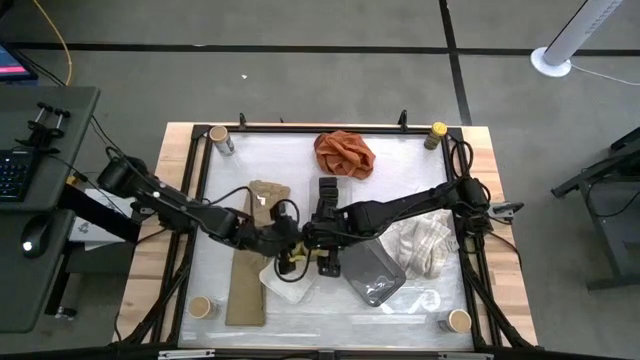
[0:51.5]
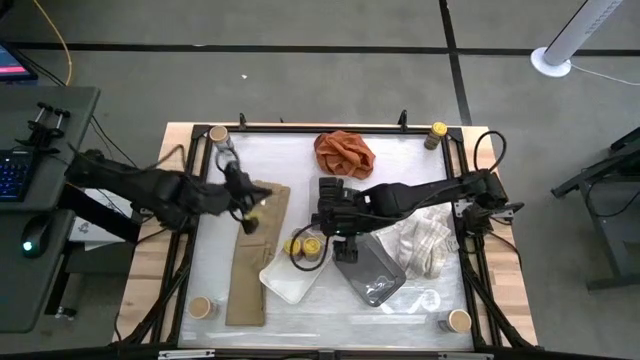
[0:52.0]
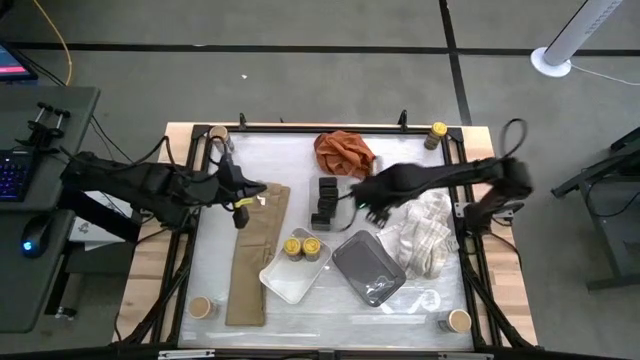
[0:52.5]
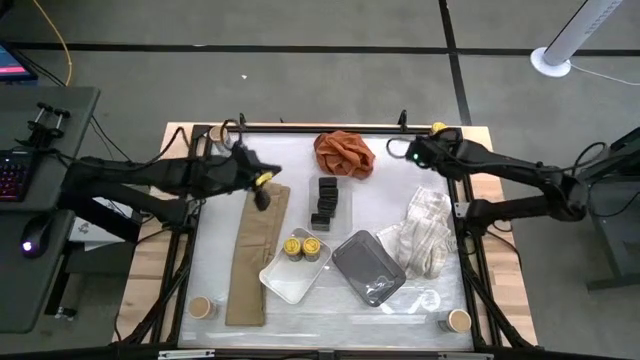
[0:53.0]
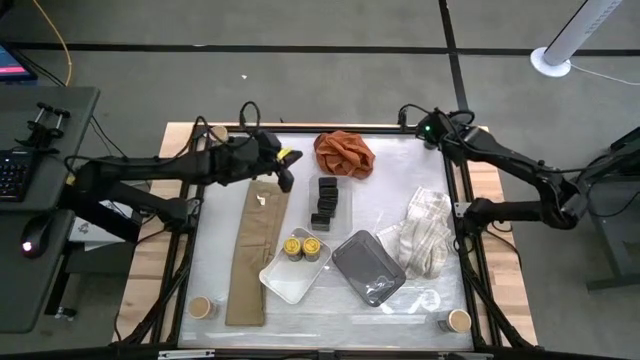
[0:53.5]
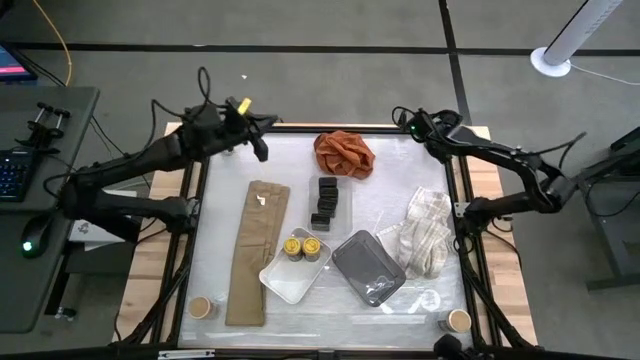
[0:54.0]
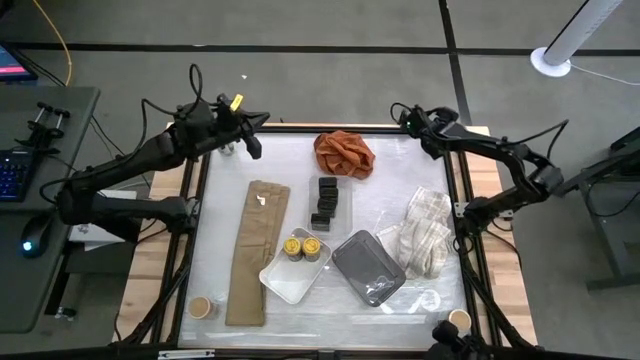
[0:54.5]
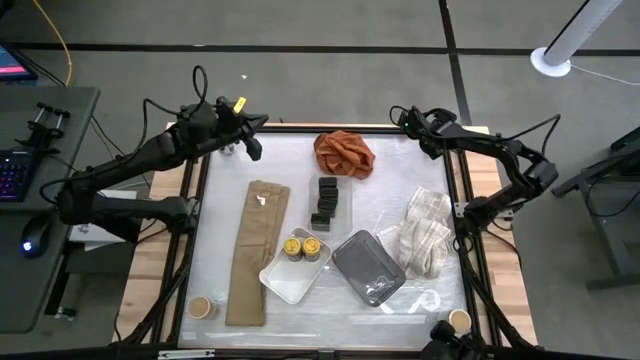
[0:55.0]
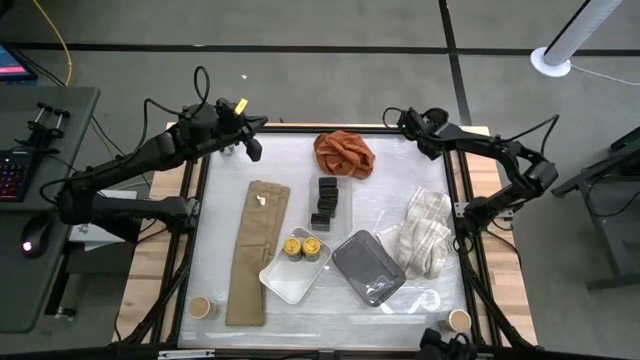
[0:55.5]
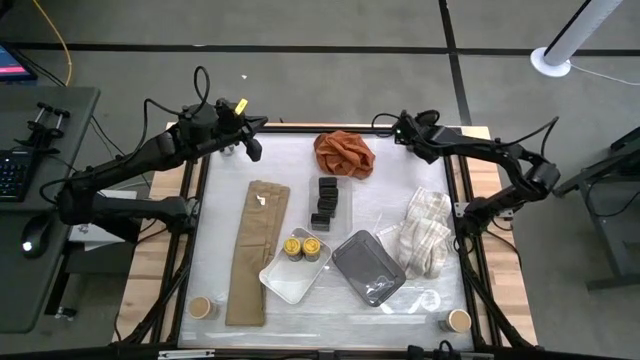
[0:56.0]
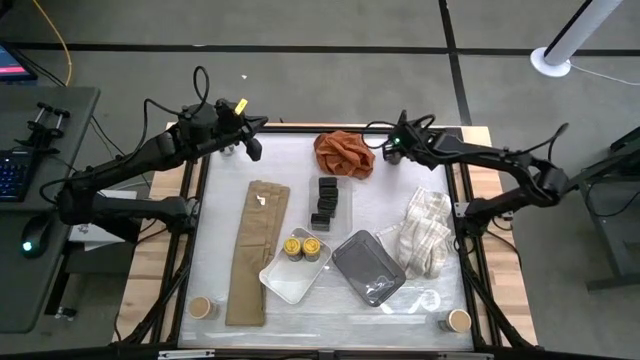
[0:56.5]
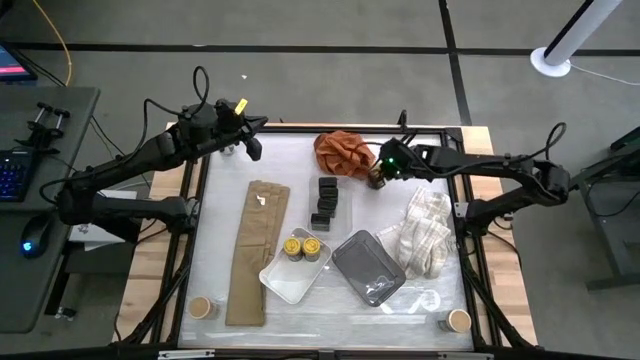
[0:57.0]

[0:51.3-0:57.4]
Task: Sort spices by type
Put the yellow seasoning bottle into the white bin

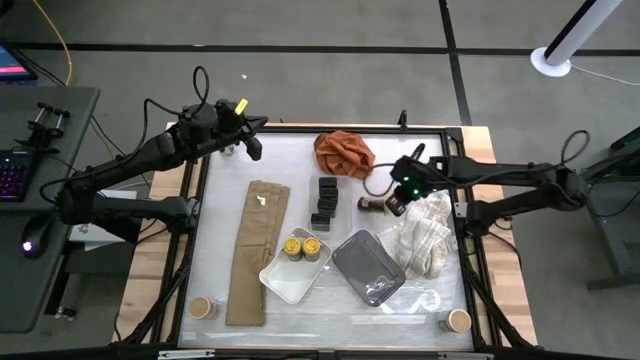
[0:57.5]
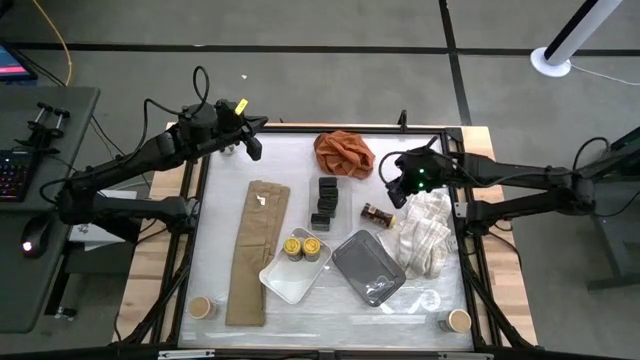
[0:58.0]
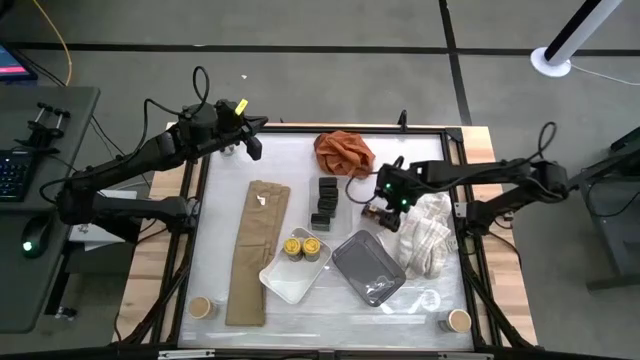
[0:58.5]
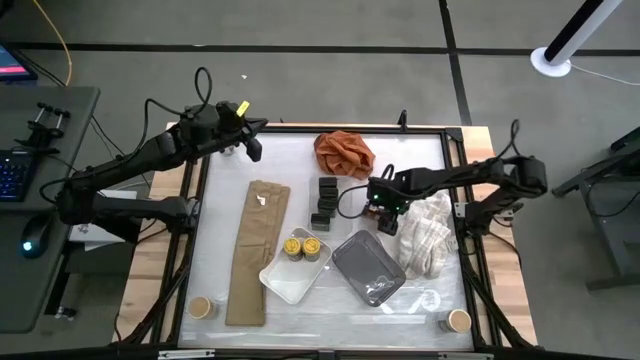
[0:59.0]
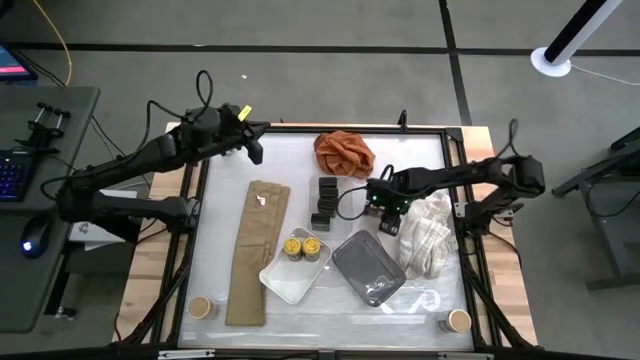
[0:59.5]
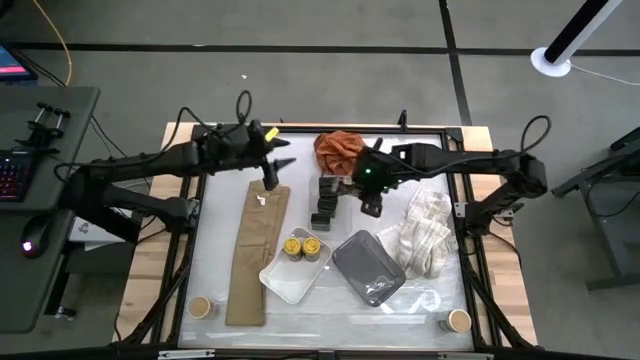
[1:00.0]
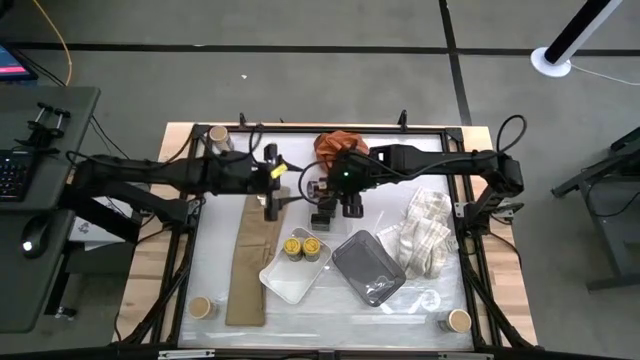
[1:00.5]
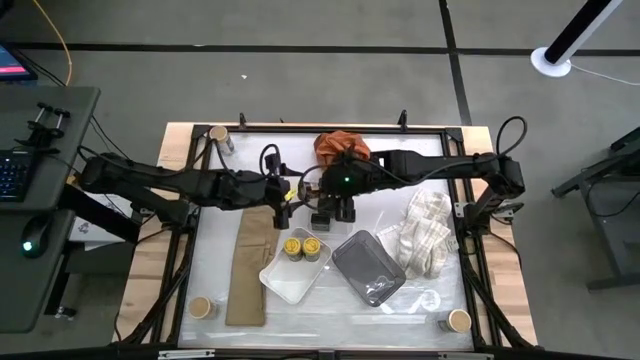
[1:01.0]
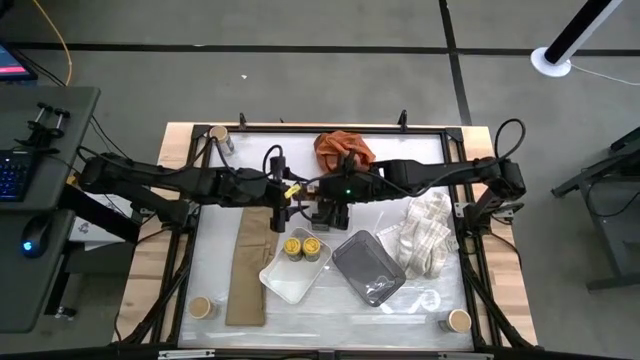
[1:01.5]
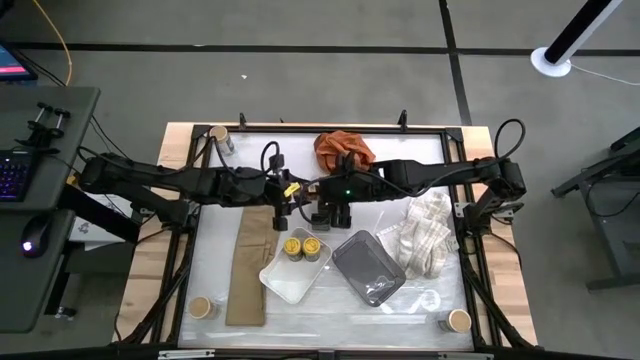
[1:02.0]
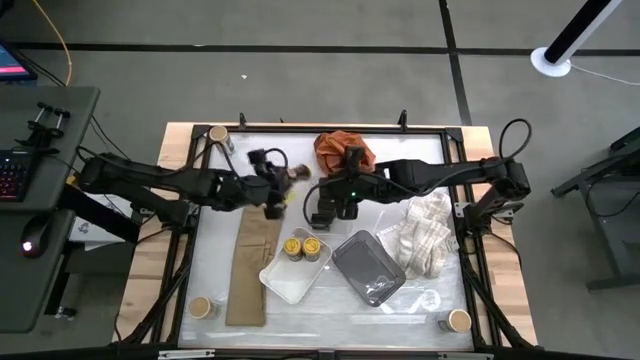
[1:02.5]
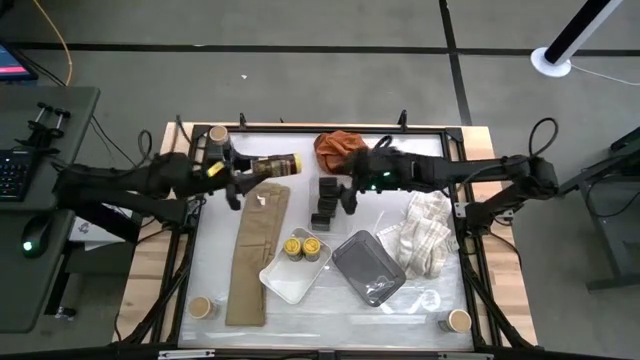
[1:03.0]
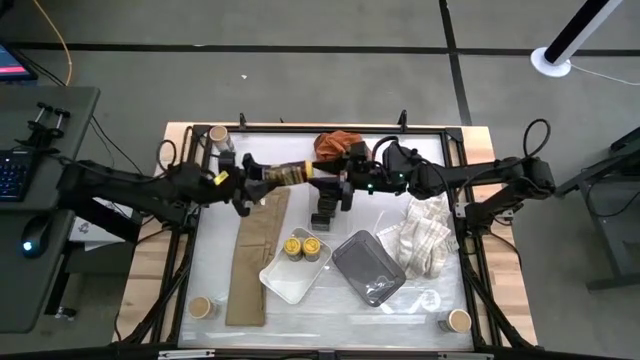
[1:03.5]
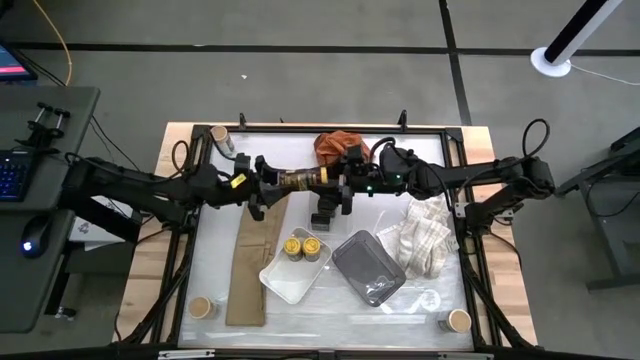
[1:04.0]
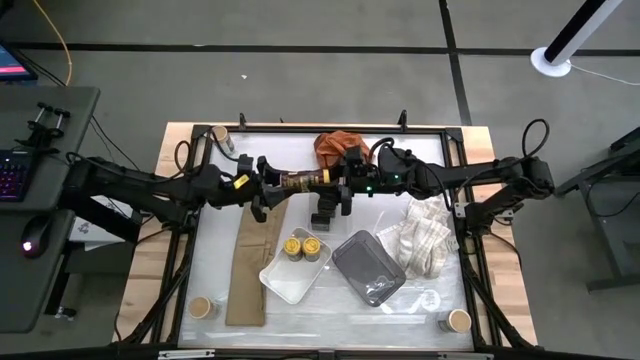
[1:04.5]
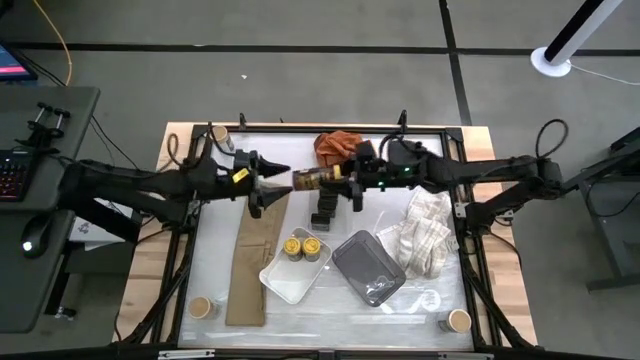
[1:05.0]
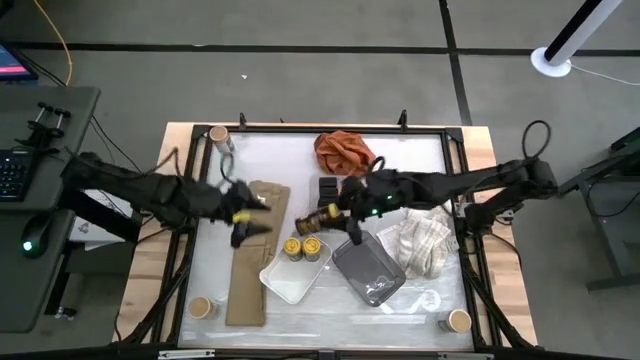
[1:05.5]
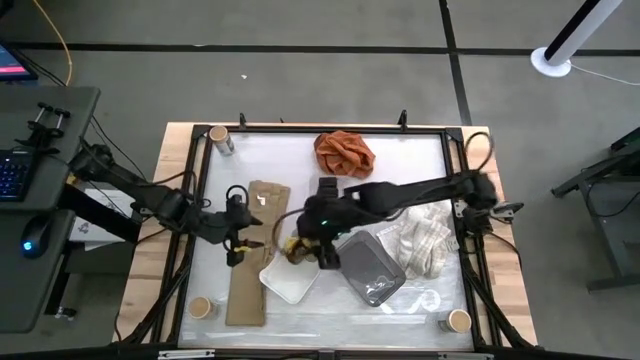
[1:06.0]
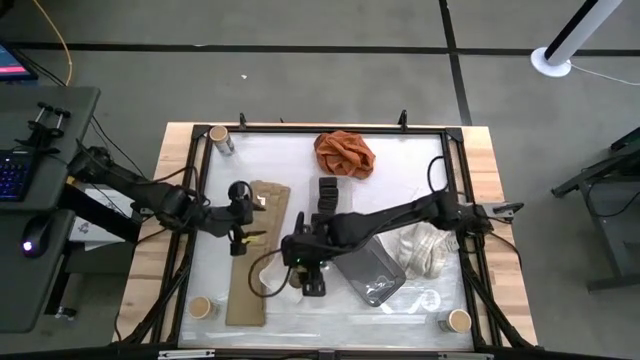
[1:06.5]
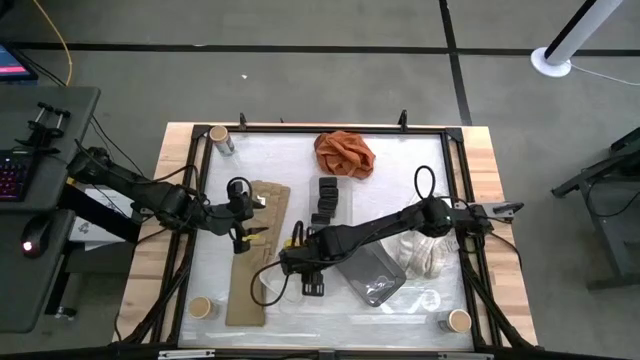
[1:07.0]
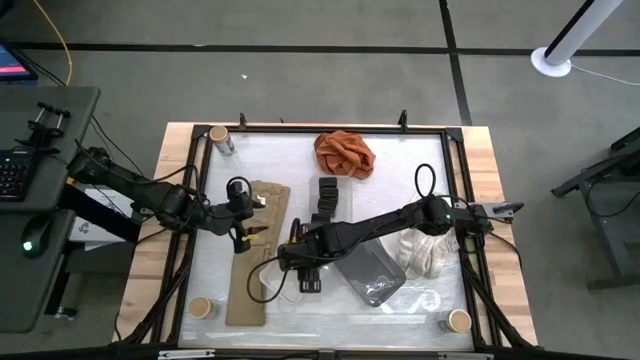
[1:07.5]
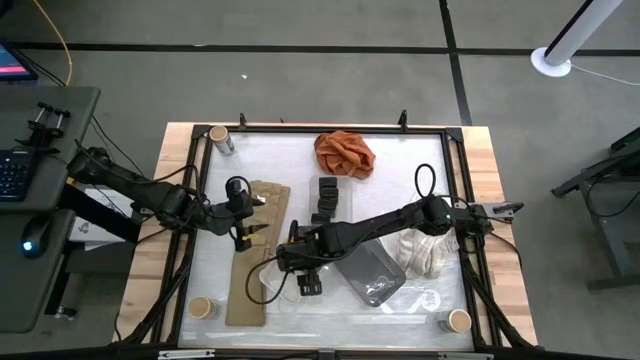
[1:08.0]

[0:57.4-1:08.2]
Put the yellow seasoning bottle into the white bin

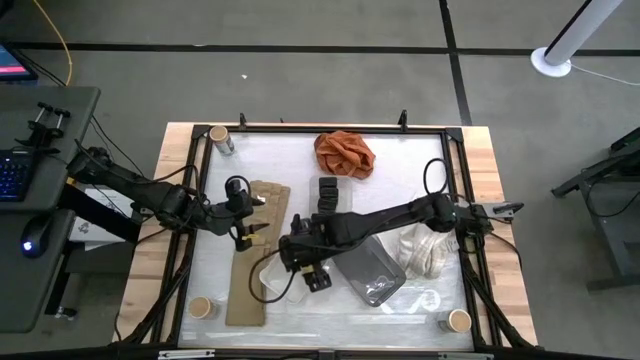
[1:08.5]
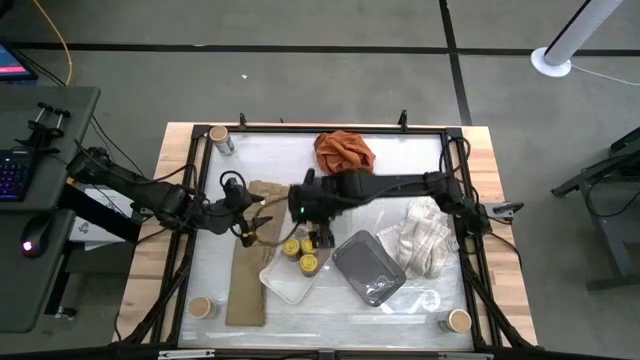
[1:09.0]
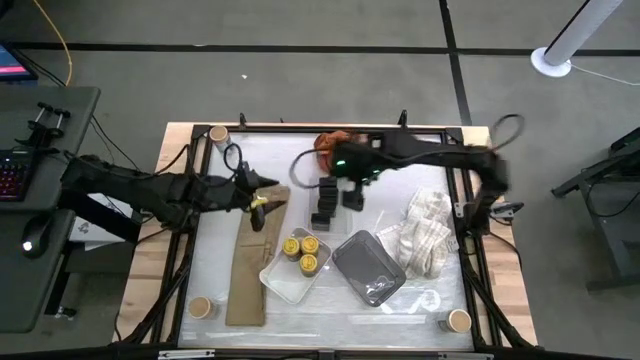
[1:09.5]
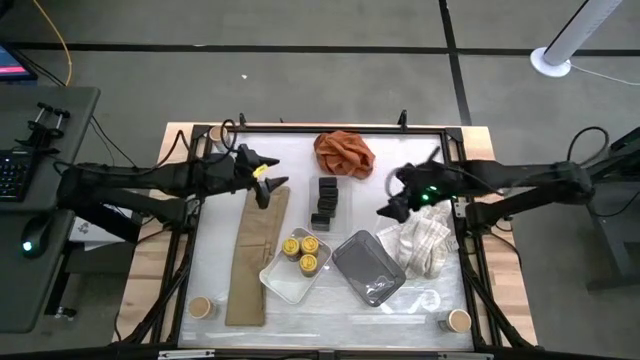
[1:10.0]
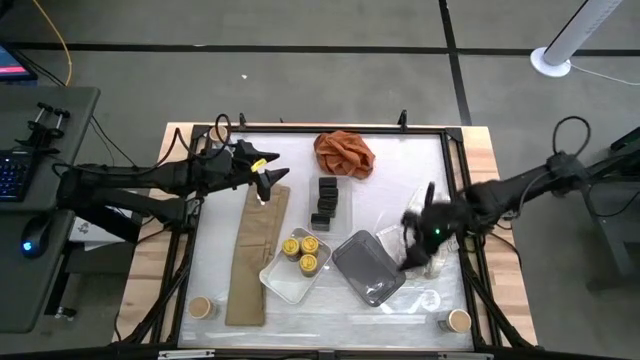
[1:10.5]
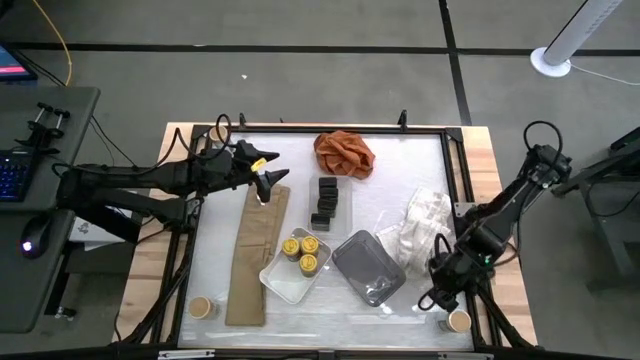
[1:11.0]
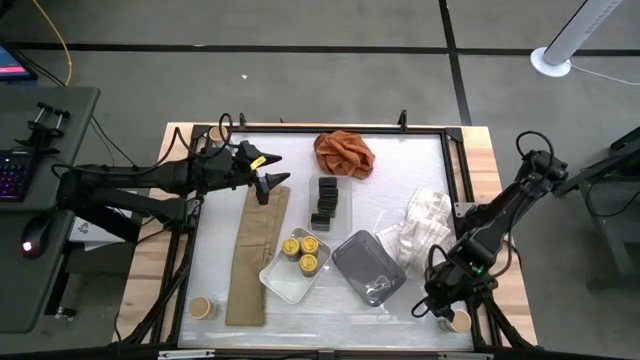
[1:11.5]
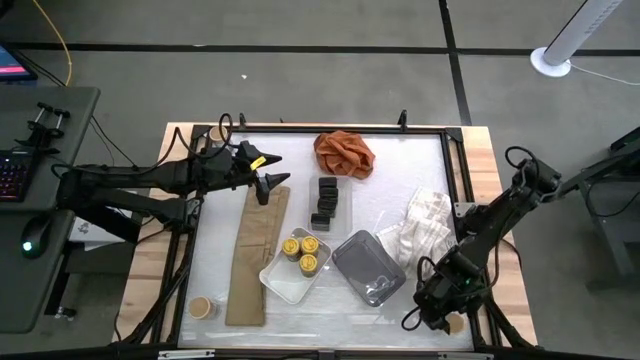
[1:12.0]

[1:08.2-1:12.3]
Put the bottom right gold seasoning bottle into the black transparent bin

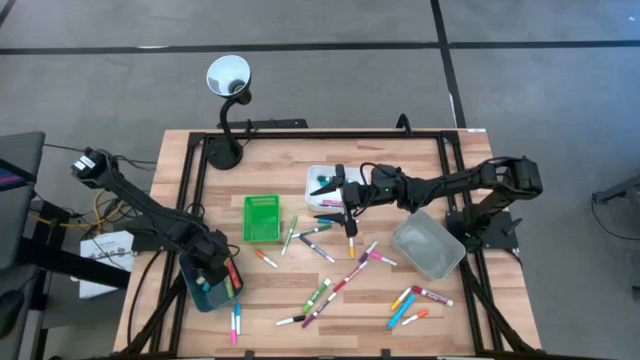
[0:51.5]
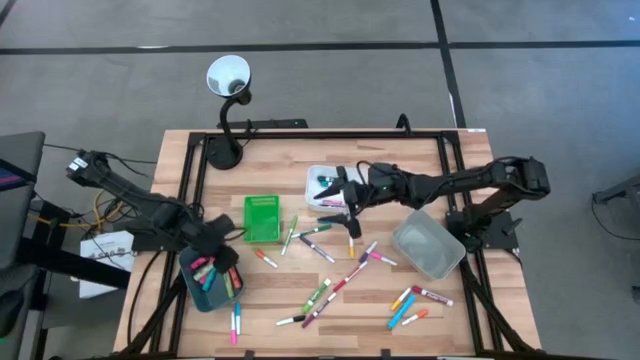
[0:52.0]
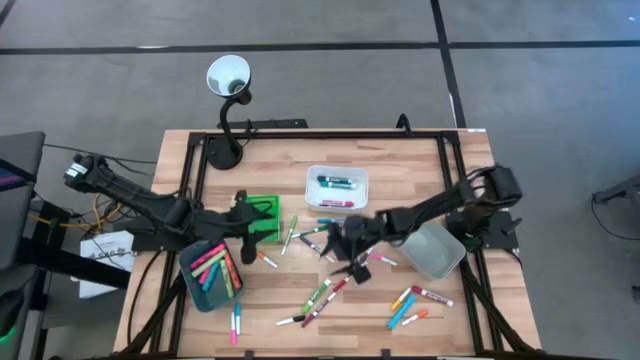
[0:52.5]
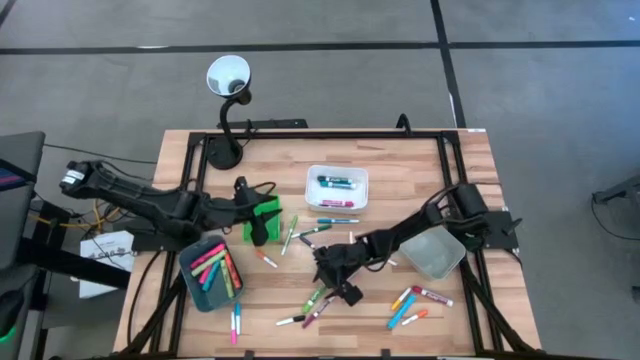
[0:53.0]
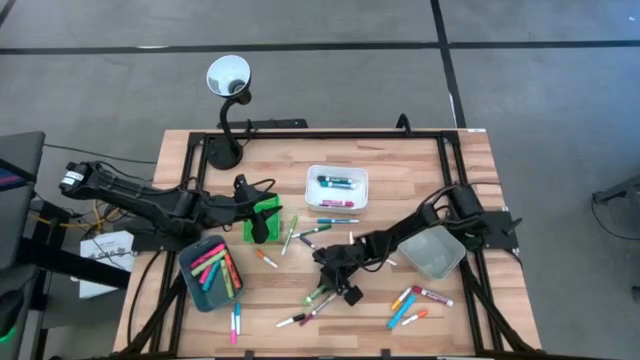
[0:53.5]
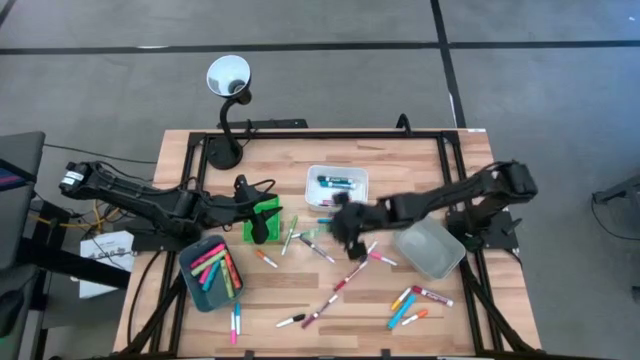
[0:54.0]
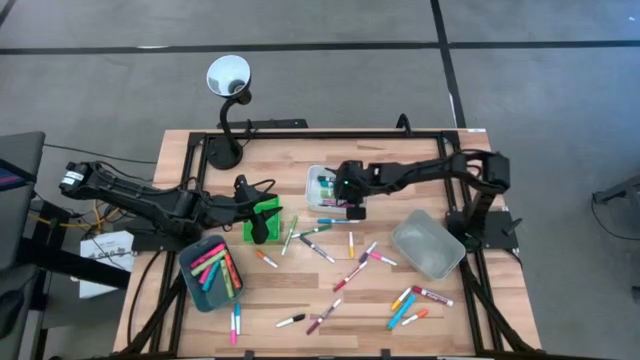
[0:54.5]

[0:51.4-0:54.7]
Task: Pick & Place Markers
Put the big light green marker pen into the white bin
